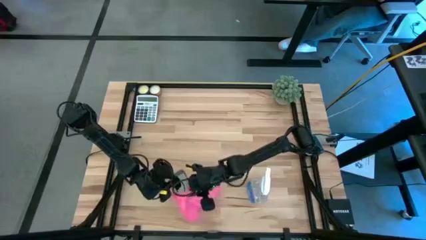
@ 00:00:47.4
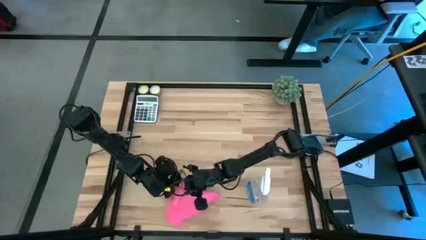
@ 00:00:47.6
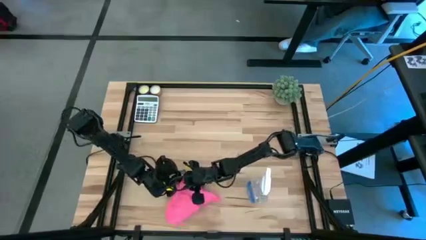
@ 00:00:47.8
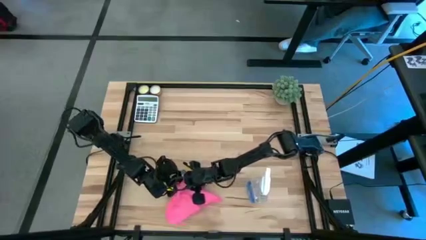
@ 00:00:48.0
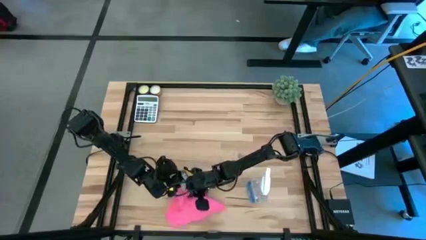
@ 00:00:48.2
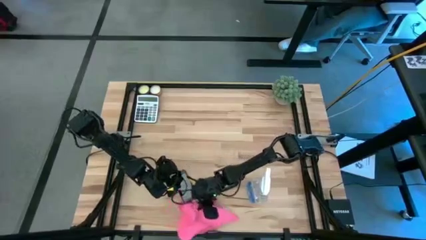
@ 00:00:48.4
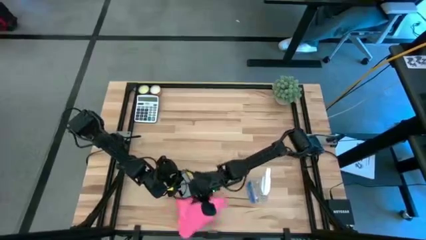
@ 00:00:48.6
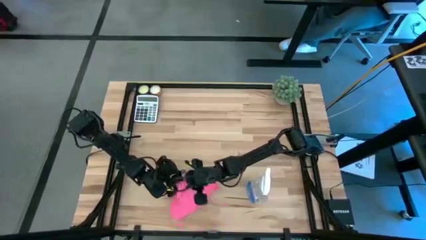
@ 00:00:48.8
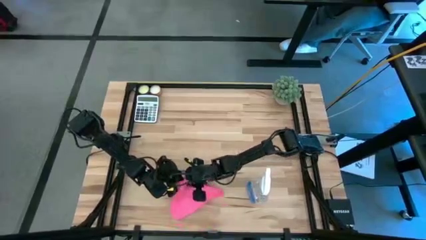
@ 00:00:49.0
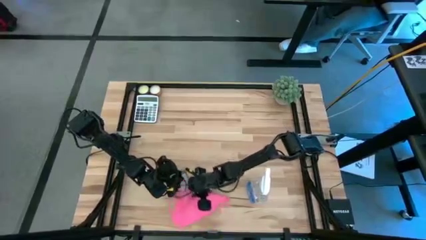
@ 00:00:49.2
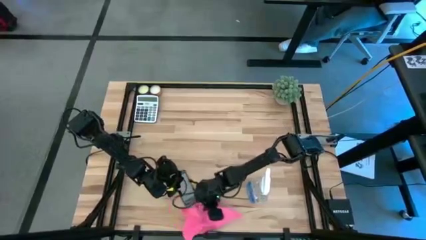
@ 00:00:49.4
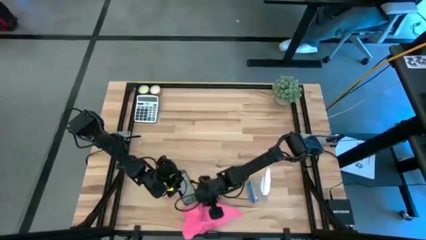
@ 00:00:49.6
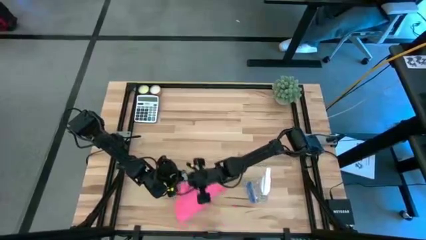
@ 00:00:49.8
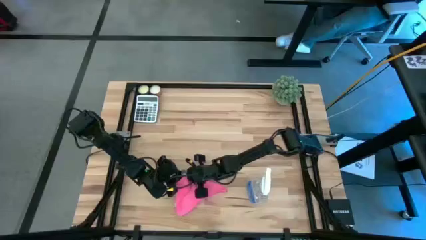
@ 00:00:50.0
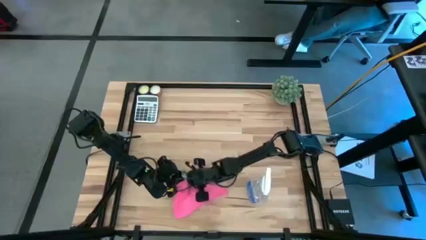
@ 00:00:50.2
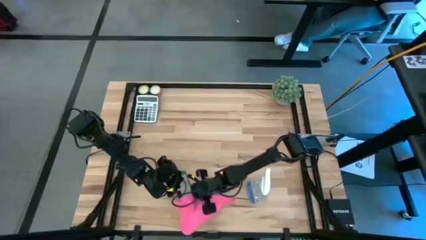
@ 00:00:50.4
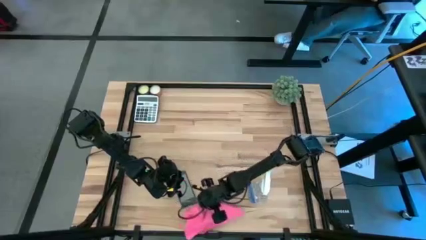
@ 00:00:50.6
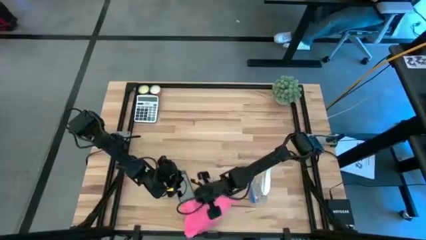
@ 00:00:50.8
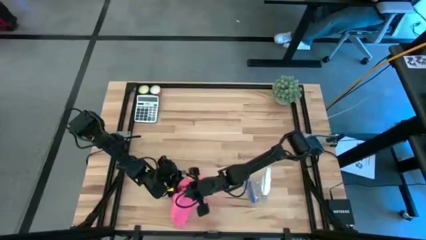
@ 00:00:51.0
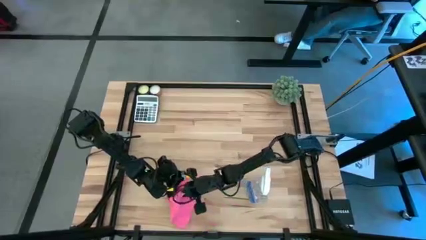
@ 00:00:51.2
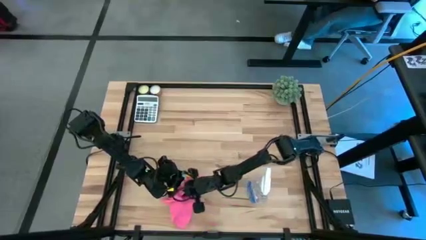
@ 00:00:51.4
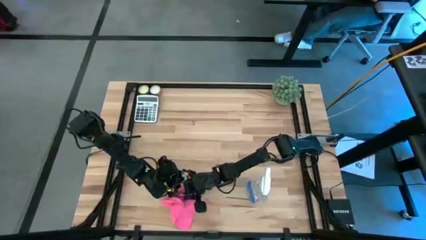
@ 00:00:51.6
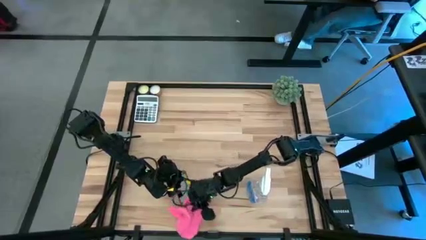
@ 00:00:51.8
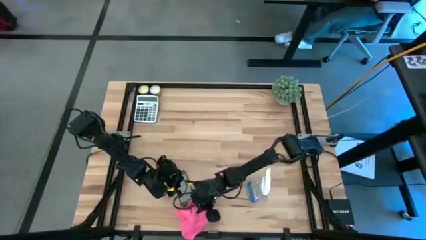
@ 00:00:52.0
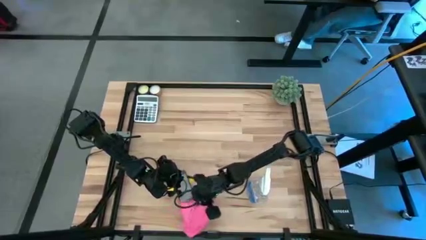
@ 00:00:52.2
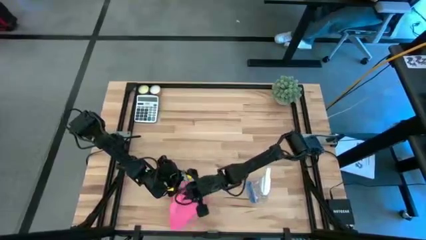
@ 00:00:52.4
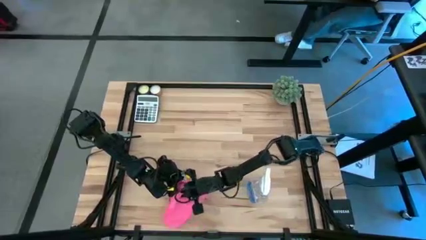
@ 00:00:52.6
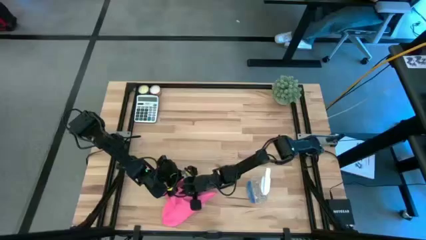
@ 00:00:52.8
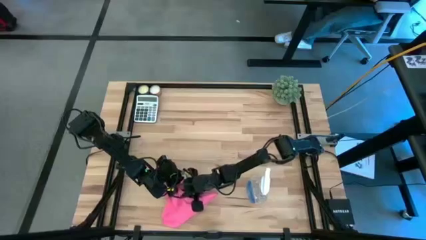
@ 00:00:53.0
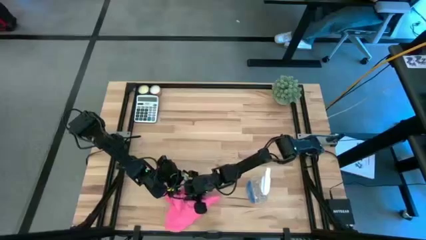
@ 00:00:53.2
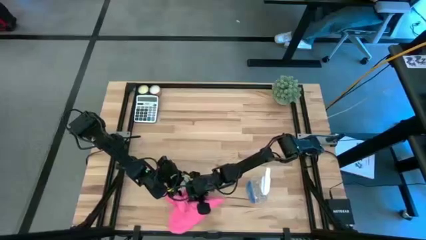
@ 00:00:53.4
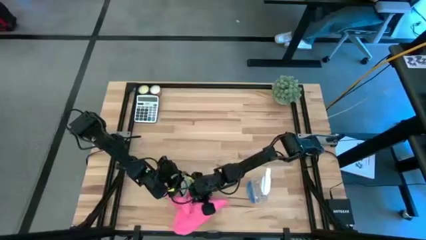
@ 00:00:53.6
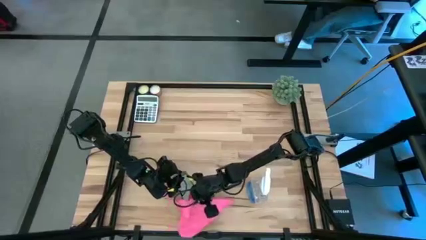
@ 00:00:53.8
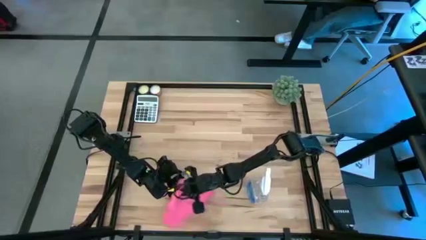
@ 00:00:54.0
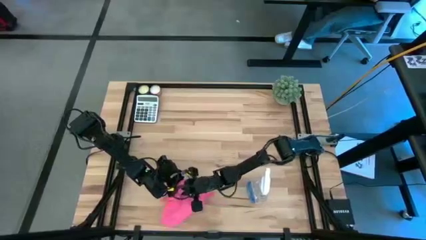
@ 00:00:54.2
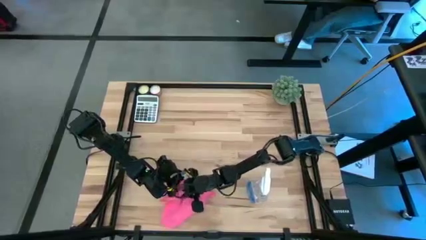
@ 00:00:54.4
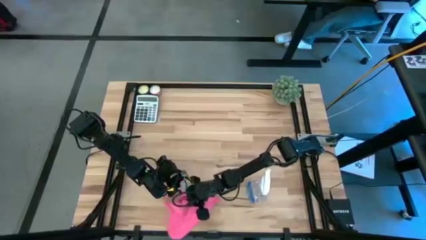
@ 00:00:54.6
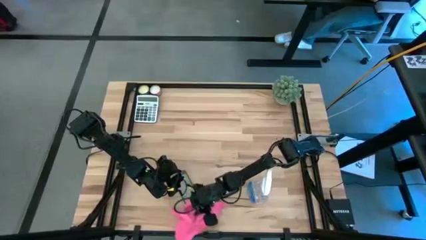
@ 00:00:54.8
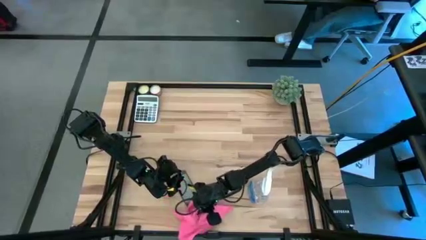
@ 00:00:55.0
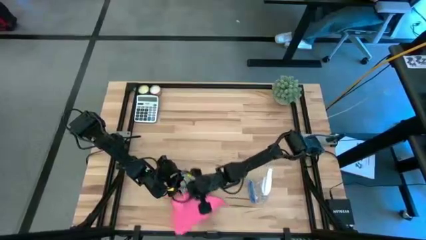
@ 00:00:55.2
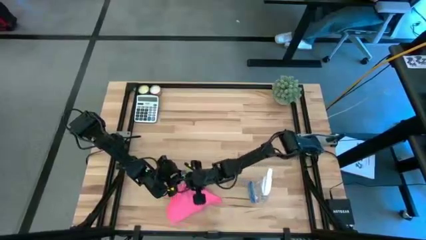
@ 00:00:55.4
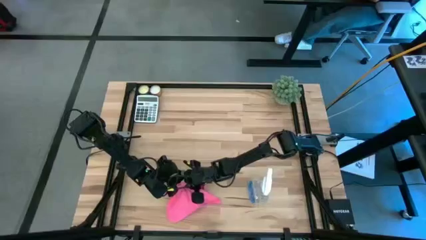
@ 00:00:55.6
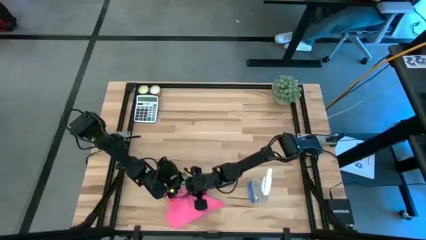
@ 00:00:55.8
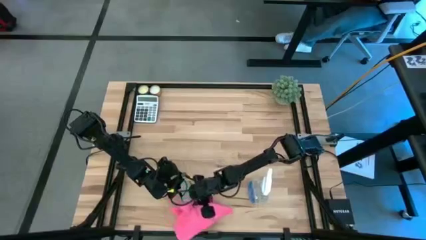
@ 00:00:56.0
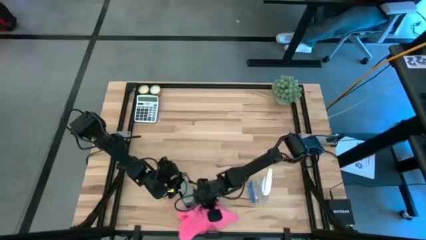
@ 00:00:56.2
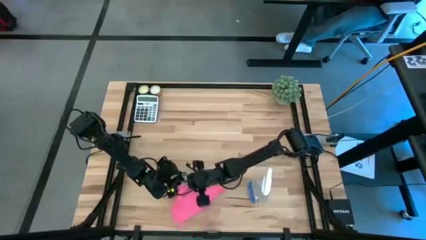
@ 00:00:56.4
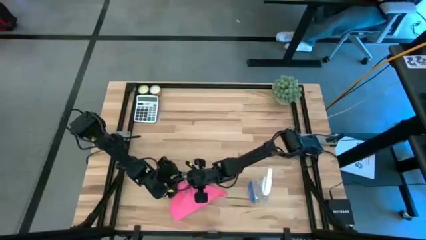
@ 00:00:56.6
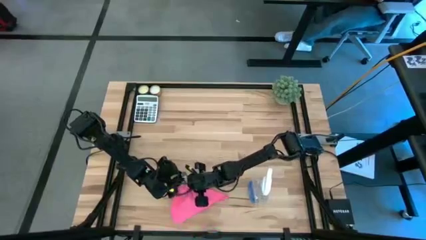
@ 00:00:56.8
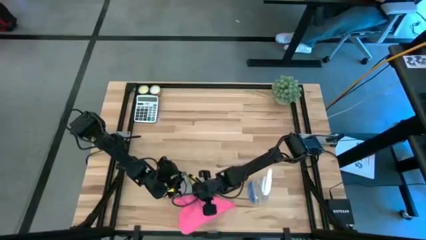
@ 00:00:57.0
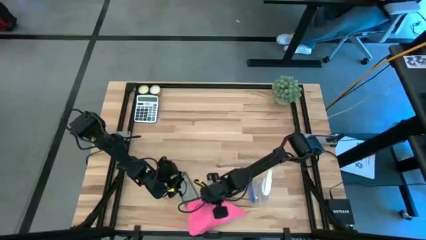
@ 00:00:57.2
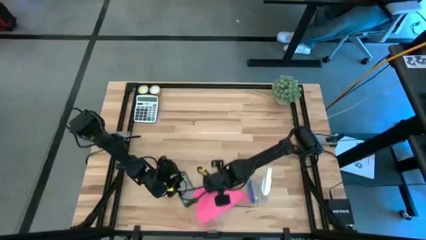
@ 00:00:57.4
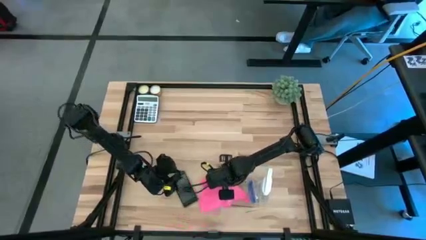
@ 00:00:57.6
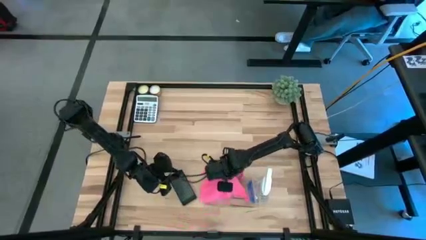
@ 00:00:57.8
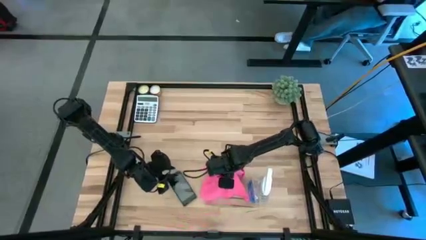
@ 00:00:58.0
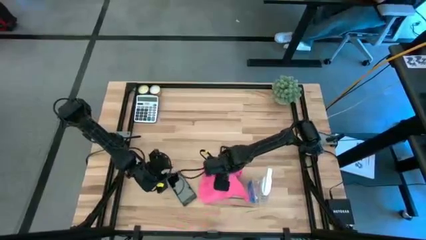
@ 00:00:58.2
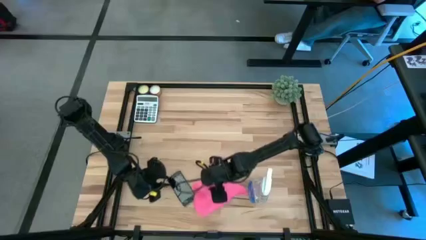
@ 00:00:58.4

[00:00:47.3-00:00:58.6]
Task: Apply microfiber cloth
Wipe the black cellphone with the pink microfiber cloth

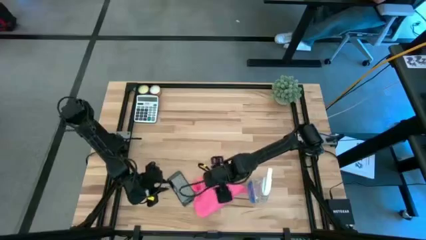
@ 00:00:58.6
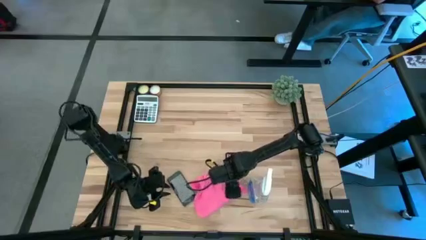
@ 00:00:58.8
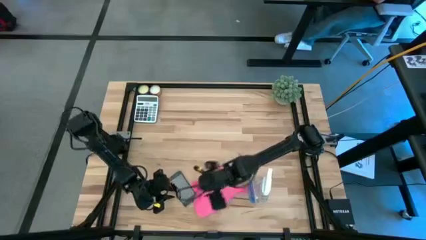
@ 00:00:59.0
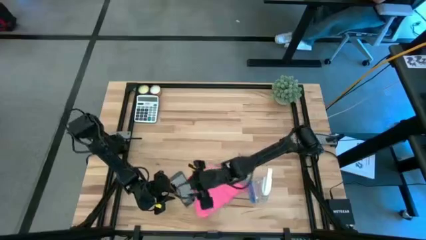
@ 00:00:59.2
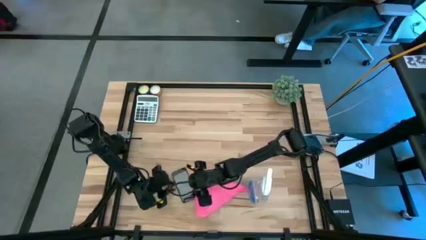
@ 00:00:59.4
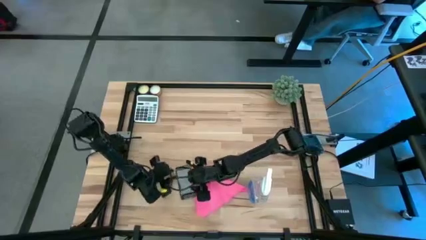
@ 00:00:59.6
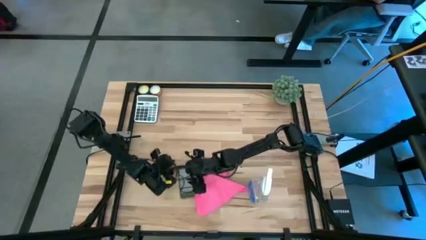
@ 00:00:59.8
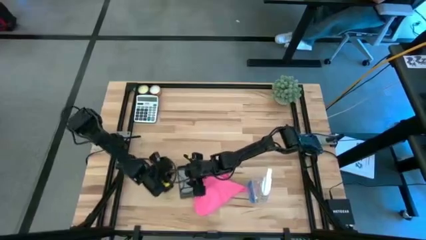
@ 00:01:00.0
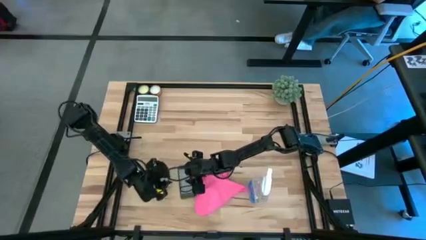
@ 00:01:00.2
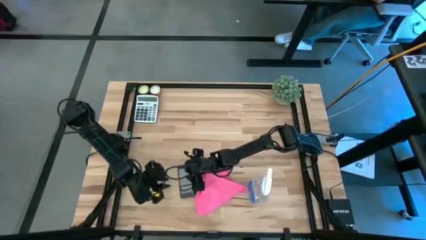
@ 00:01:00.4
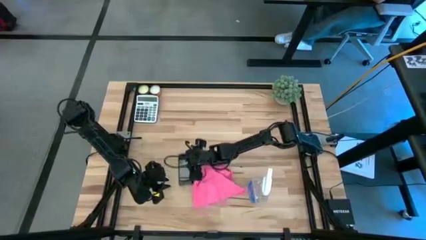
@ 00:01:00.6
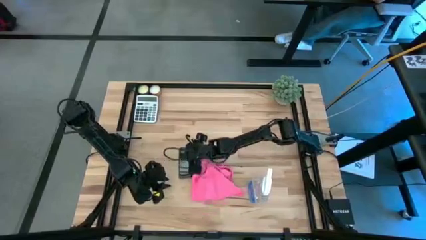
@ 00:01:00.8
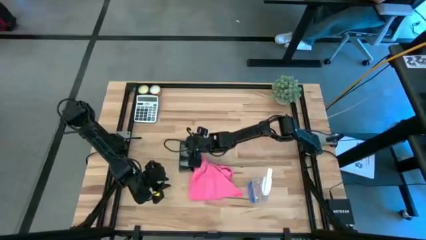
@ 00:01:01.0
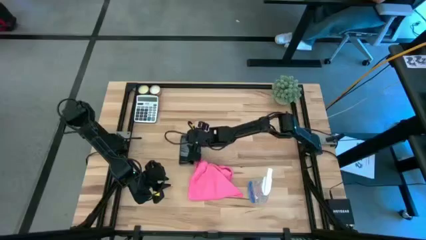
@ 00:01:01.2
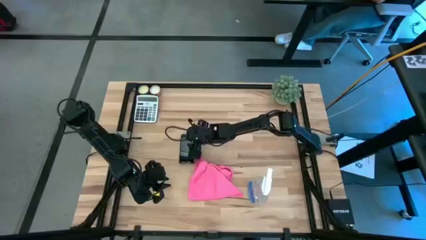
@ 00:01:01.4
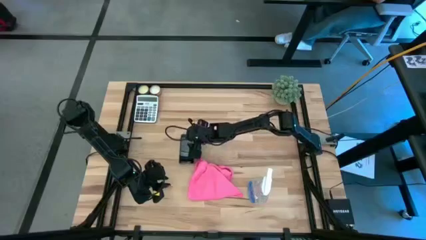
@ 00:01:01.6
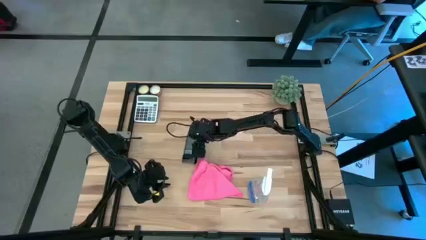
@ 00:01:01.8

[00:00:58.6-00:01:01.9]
Adjust the black cellphone on the table
